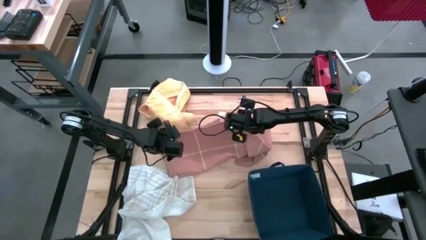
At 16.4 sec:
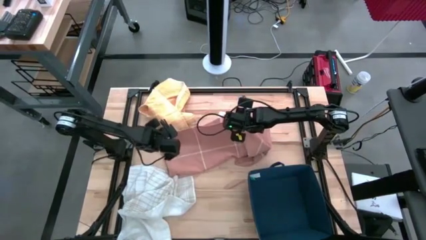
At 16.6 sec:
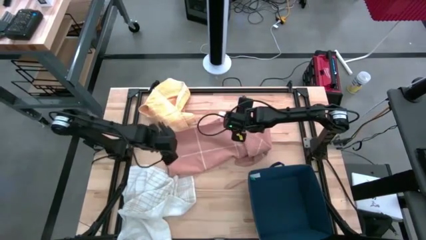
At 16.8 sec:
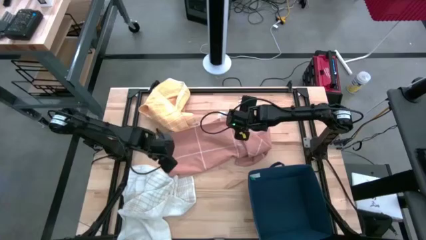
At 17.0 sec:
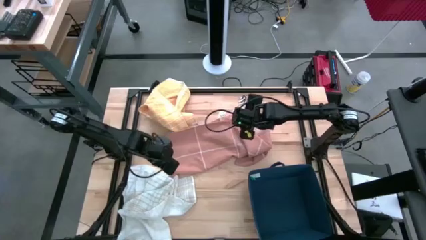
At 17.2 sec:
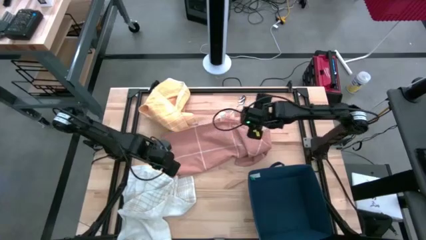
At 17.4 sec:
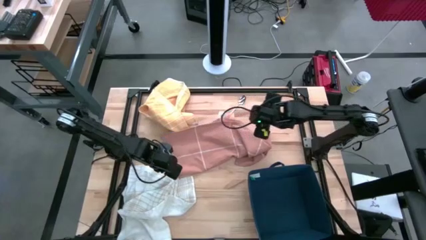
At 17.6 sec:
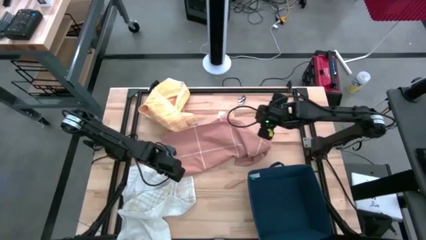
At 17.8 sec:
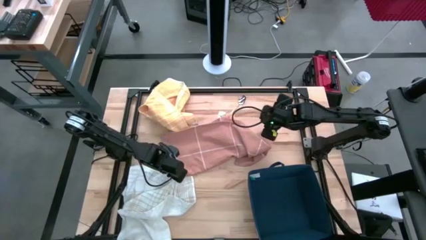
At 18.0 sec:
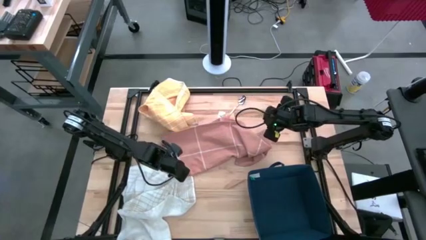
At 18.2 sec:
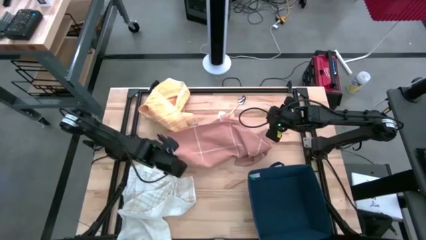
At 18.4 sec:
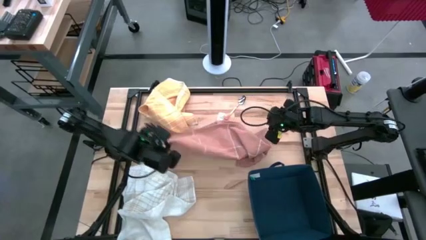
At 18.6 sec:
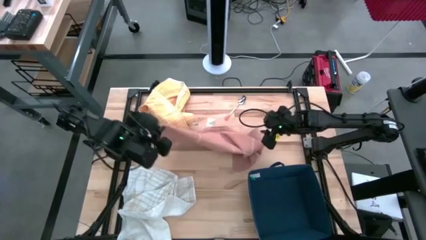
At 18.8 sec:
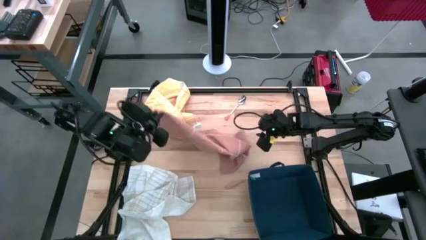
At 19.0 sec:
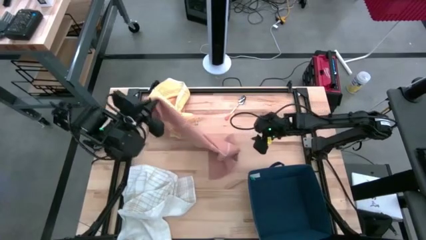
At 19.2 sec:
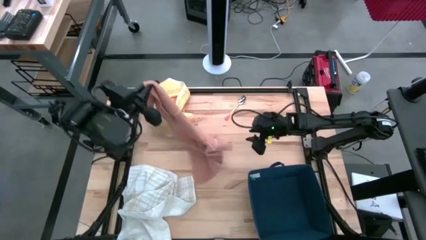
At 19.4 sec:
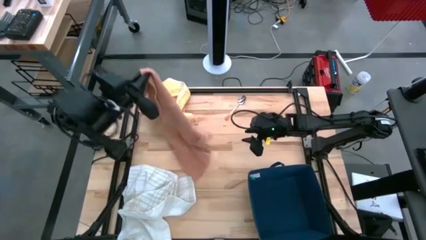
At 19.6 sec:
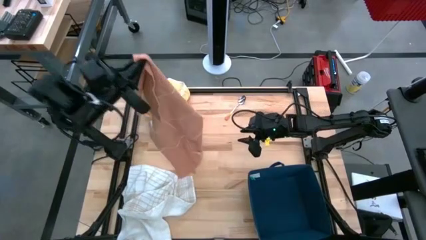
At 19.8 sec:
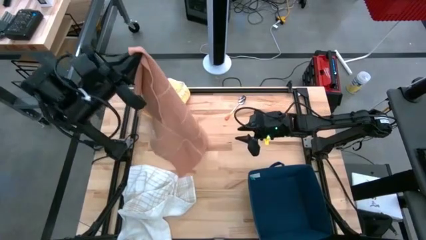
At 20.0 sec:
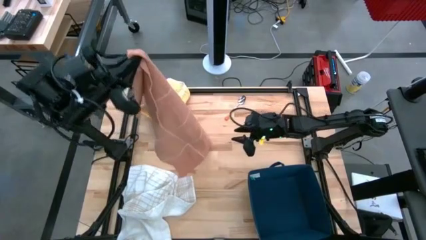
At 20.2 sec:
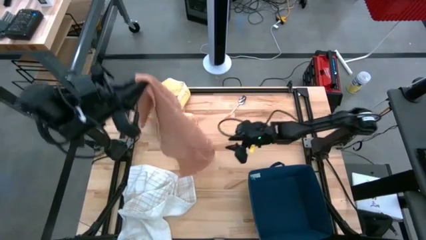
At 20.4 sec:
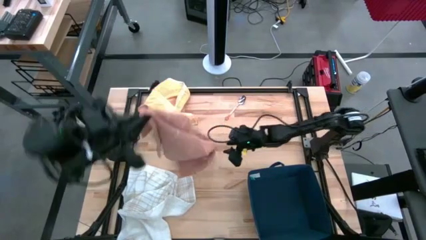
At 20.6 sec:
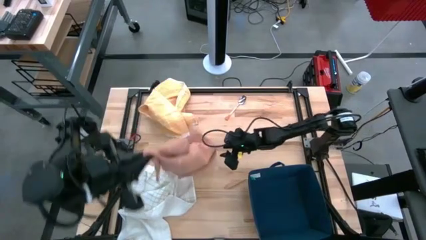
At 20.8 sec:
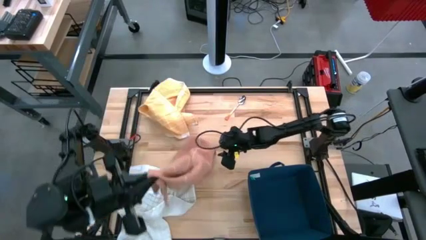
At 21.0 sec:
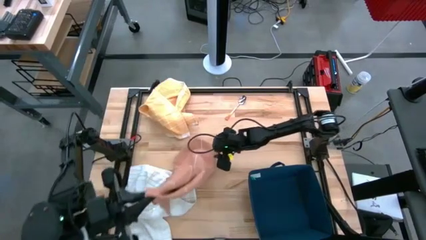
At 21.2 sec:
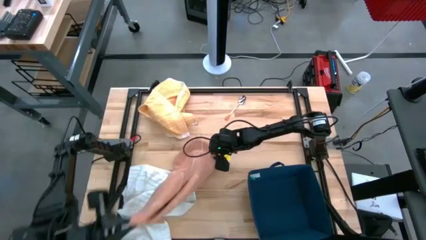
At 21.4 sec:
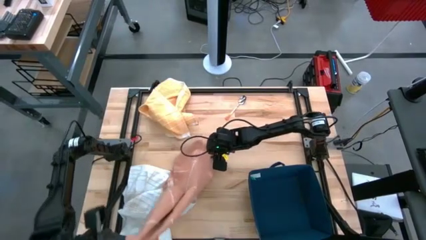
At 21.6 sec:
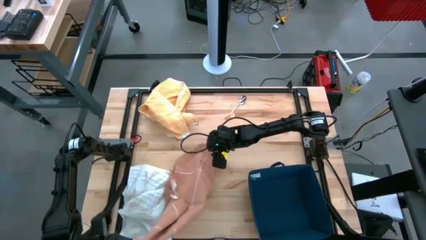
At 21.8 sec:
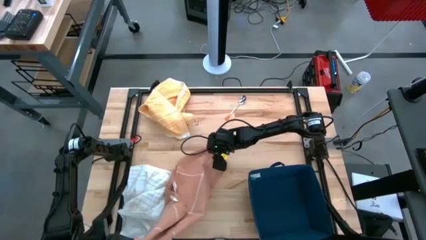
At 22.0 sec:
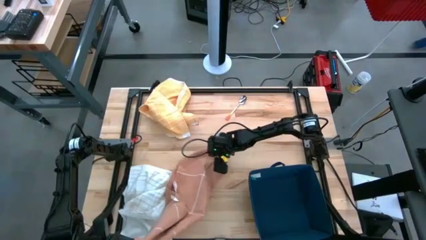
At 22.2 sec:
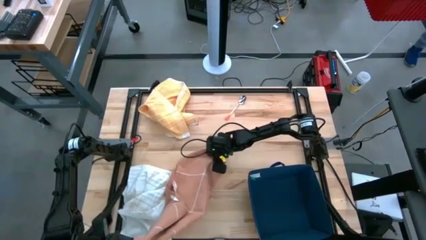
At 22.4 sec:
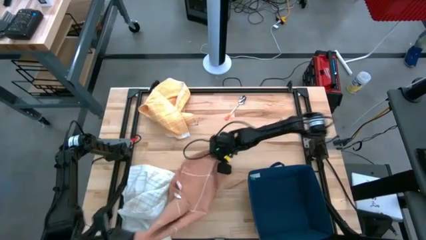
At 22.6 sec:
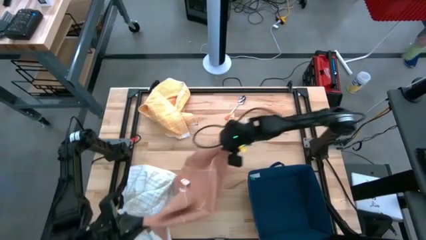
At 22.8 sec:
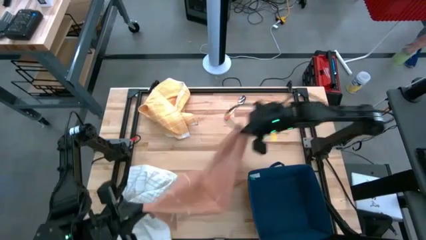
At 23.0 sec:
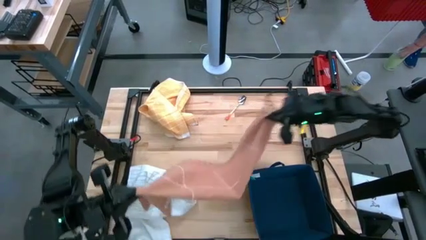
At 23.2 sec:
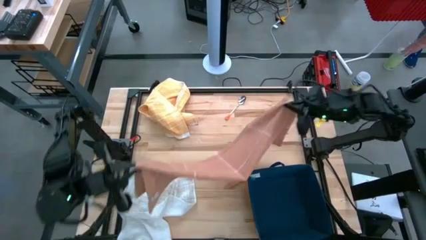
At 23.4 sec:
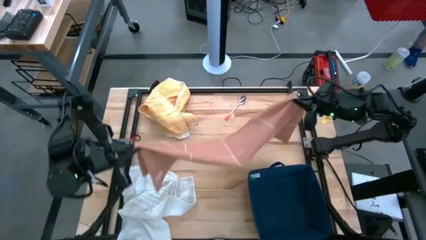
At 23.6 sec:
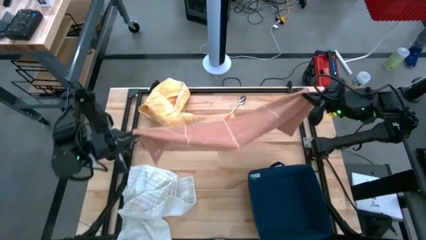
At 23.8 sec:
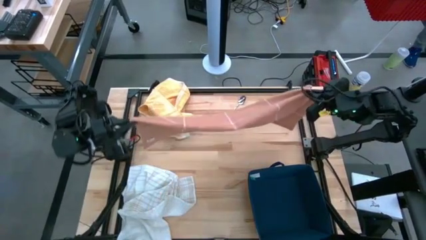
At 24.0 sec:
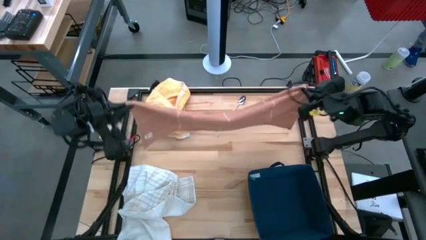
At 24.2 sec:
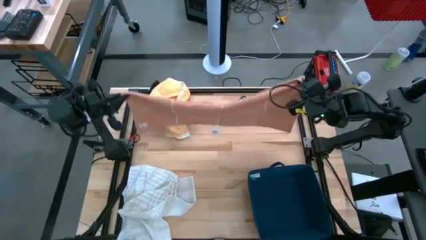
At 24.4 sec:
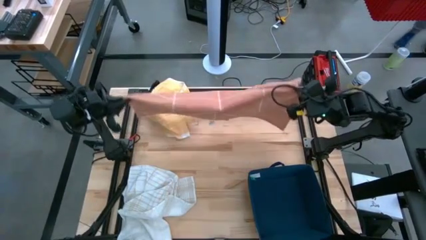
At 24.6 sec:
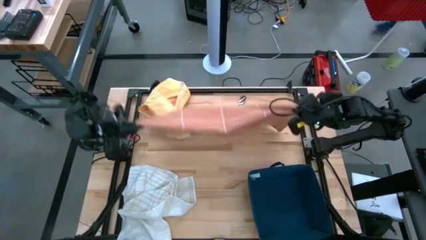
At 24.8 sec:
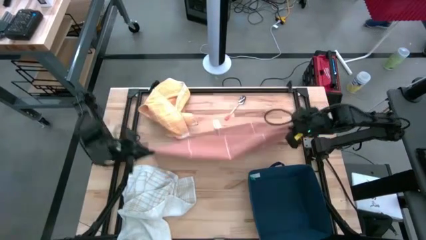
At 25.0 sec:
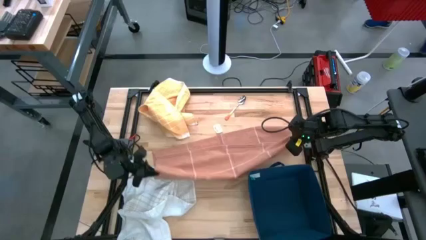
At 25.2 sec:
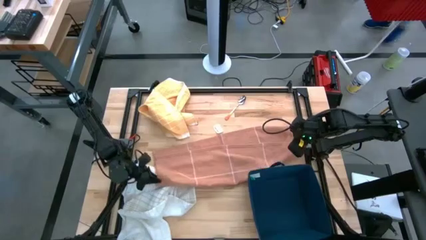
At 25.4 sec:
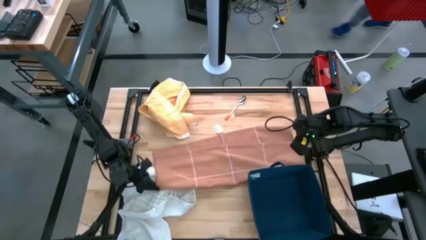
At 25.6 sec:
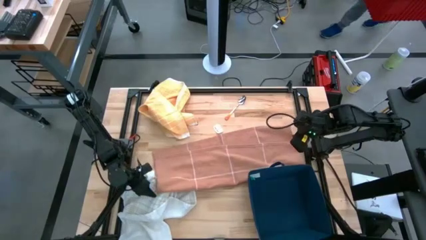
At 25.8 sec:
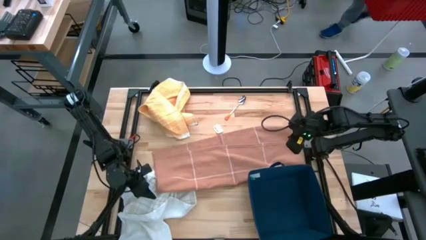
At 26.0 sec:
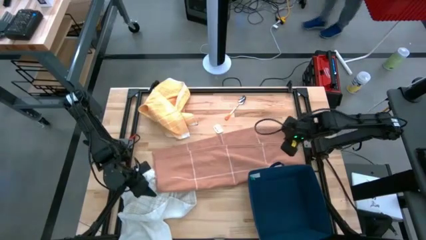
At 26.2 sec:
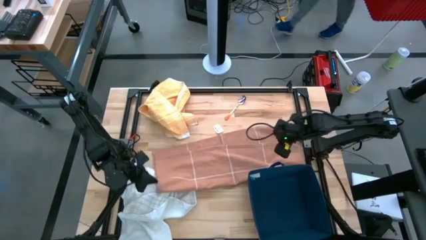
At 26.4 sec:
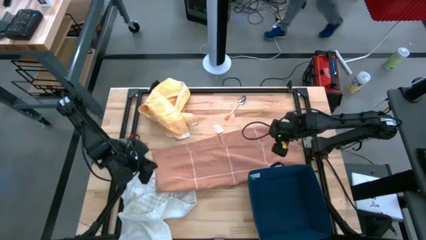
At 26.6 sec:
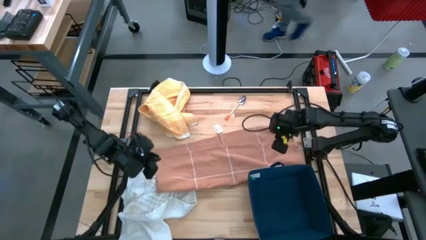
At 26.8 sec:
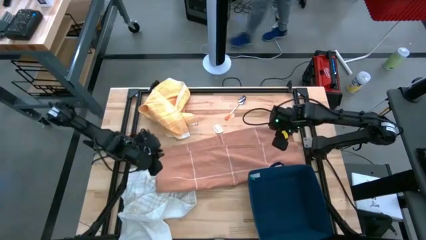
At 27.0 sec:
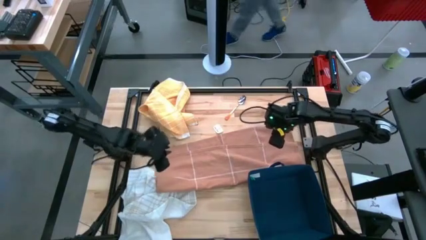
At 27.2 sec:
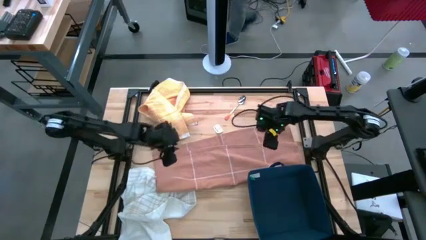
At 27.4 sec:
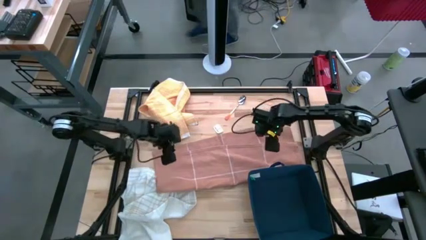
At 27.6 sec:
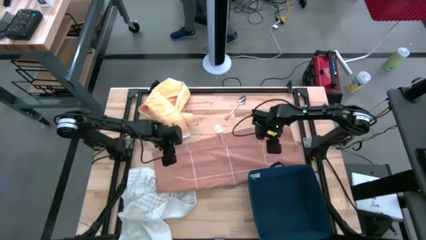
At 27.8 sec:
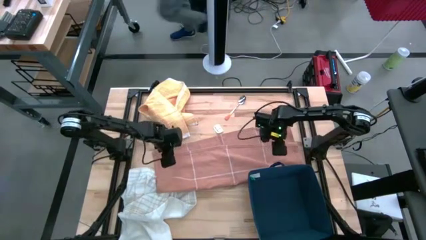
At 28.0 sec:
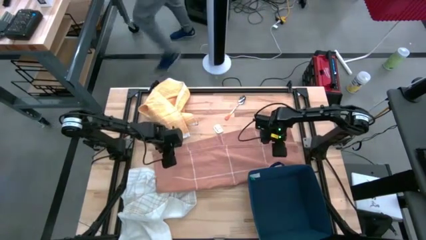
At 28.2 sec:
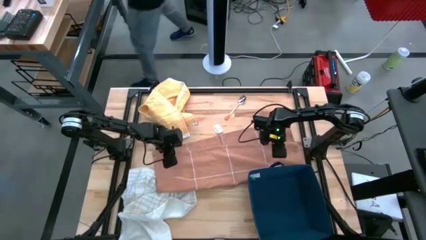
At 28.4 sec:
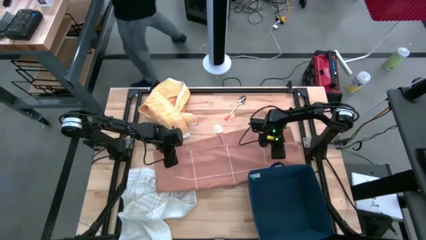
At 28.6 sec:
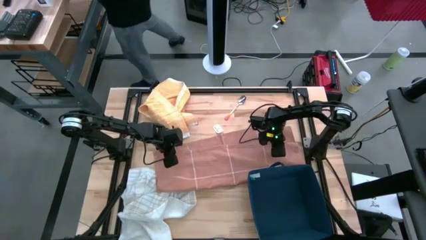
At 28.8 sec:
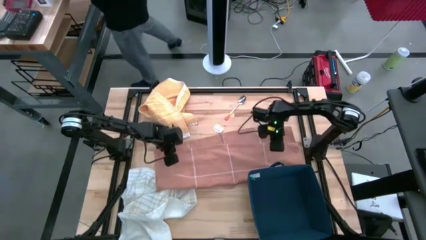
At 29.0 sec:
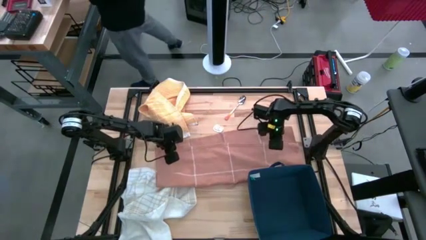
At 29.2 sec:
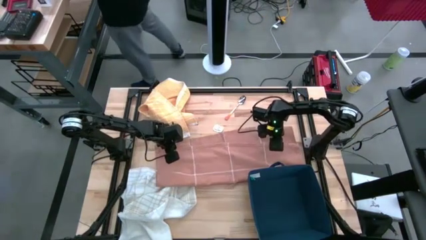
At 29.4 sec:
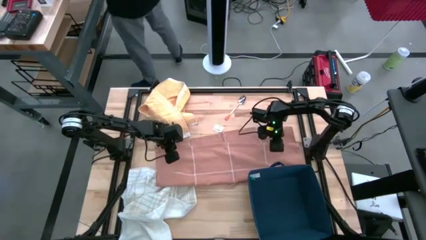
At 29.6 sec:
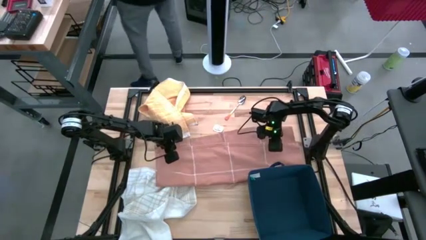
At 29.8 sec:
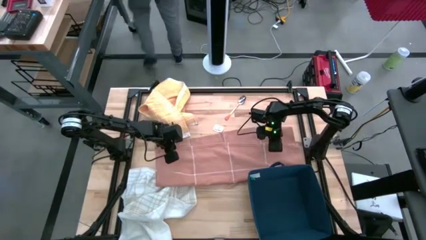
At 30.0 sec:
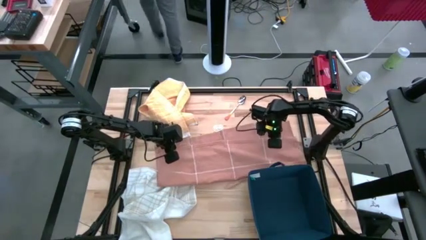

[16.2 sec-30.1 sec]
Task: Fold towel
Fold the brown towel
